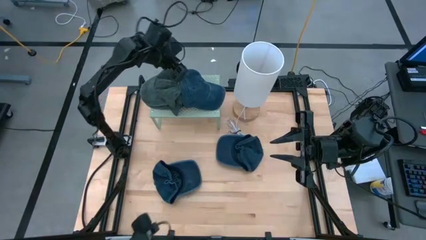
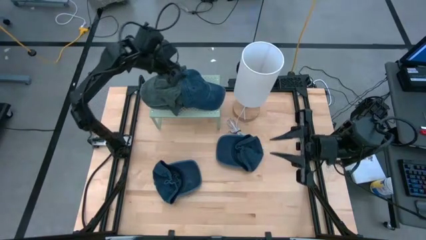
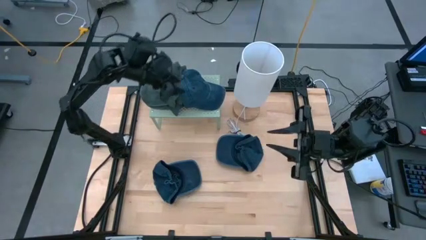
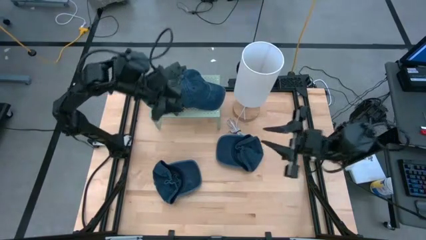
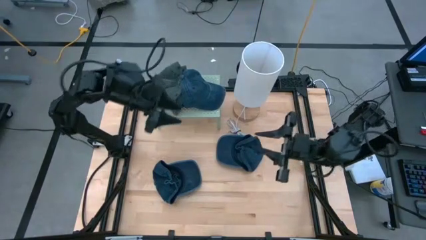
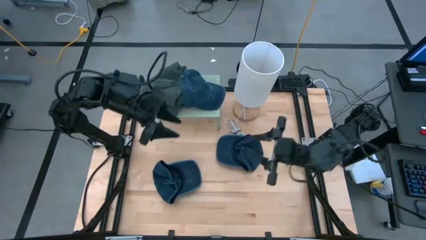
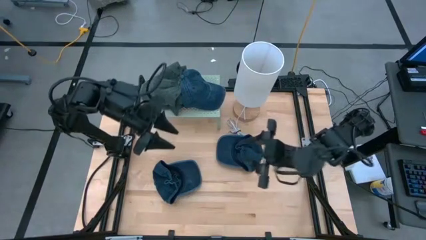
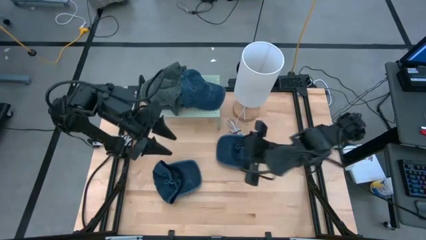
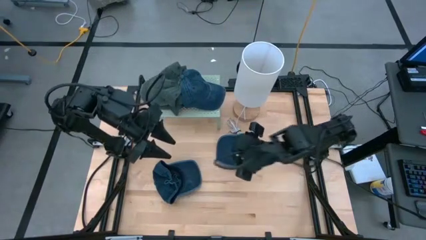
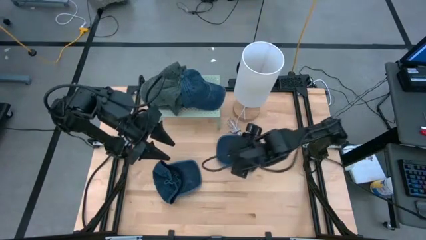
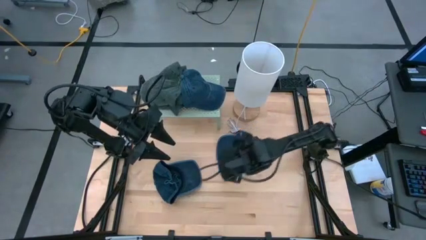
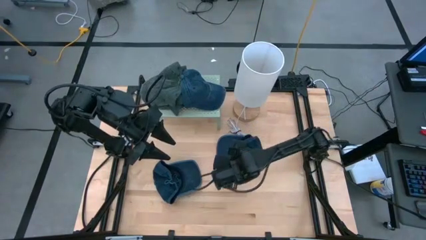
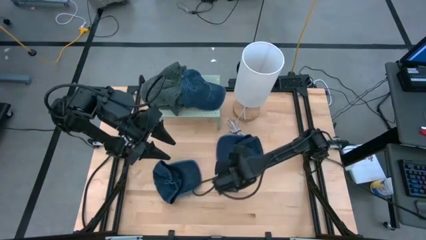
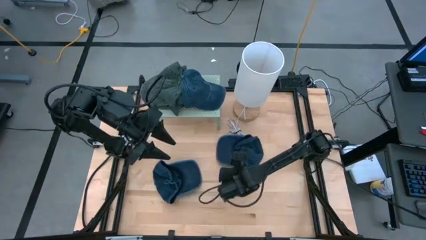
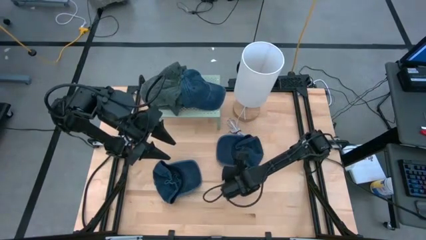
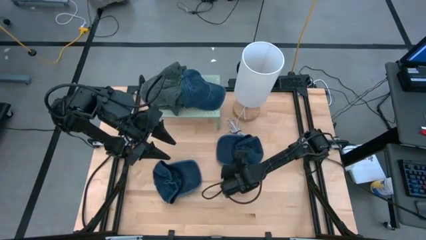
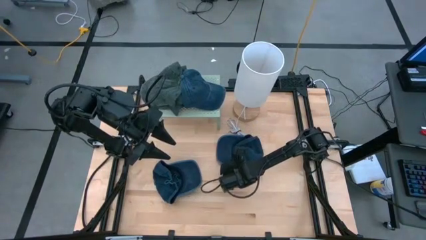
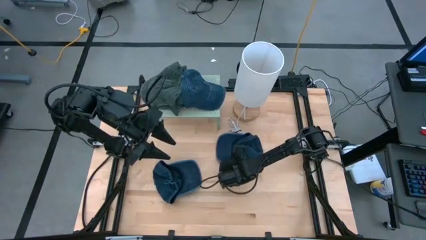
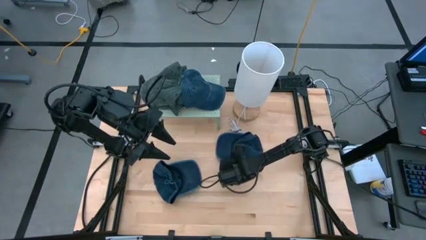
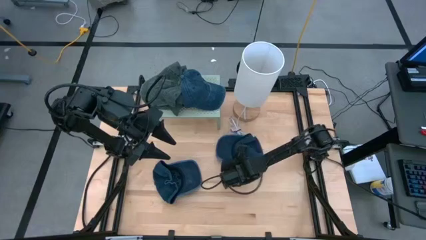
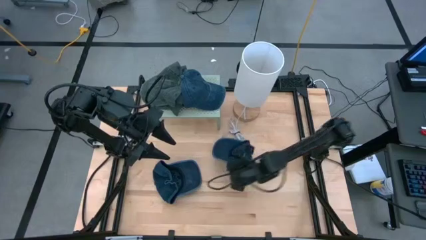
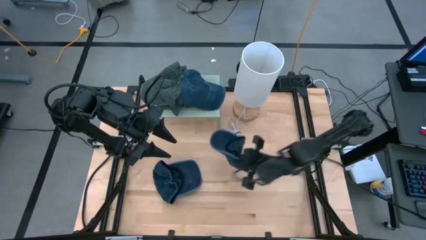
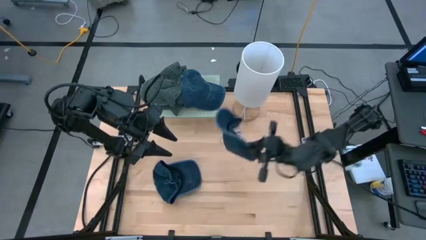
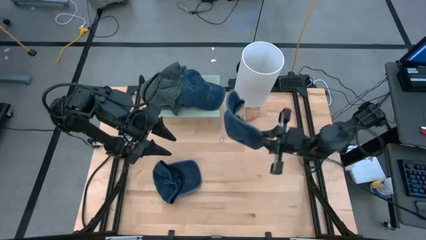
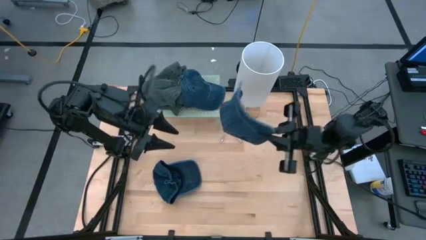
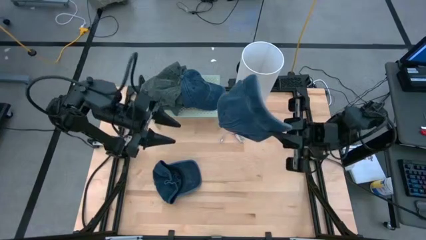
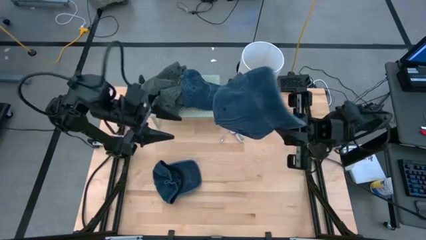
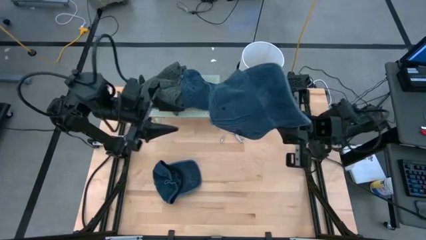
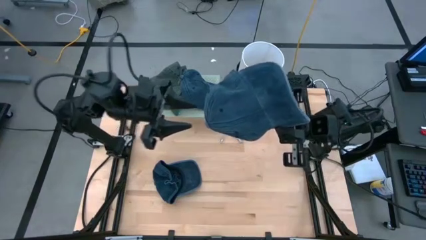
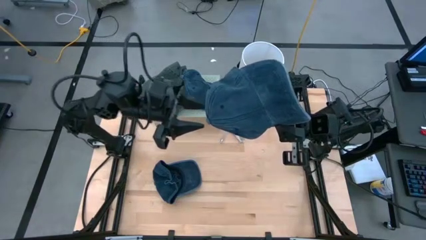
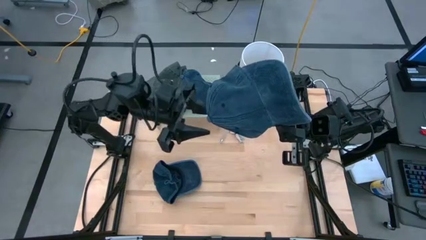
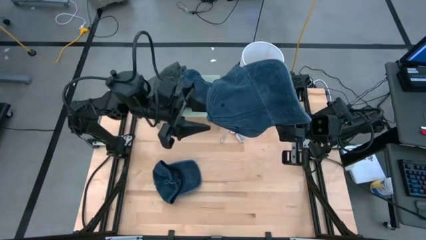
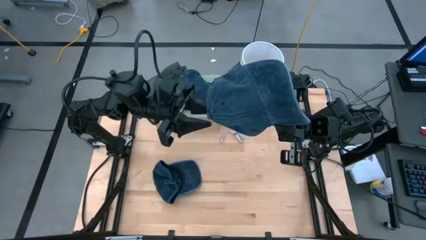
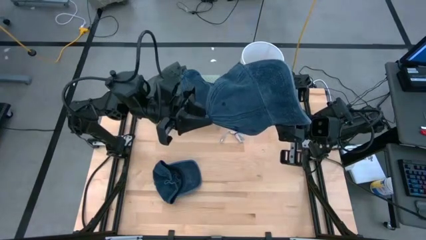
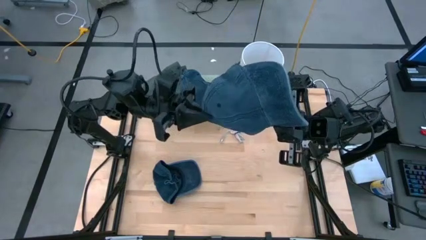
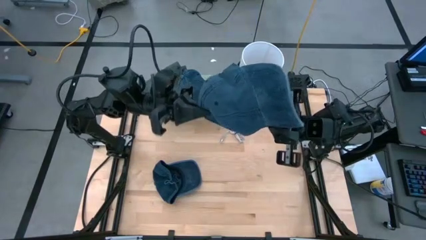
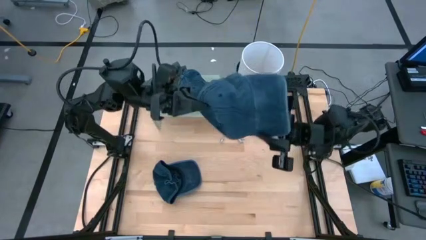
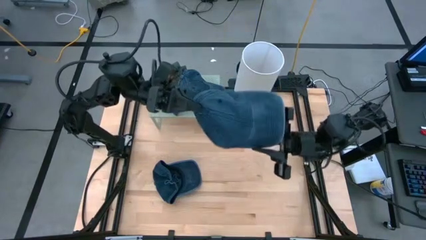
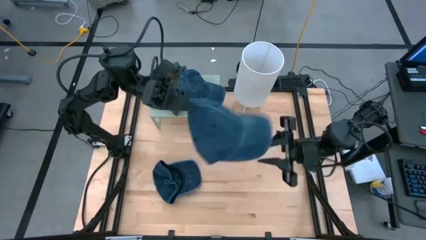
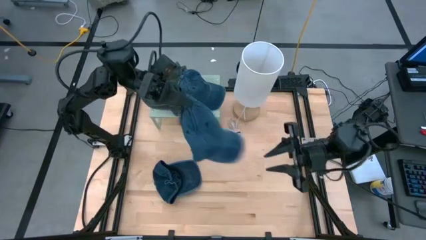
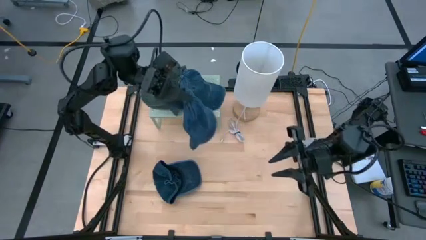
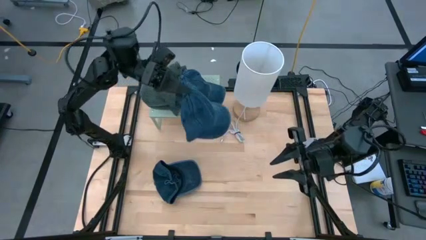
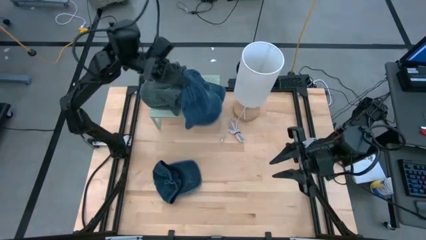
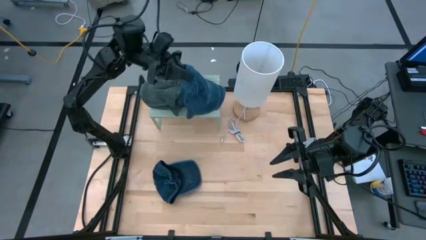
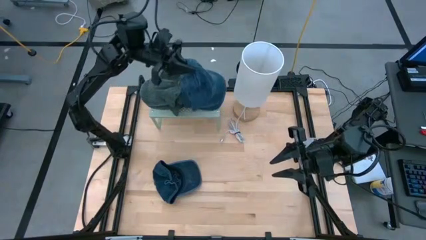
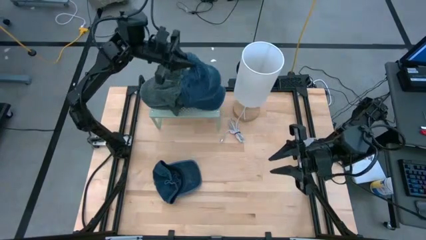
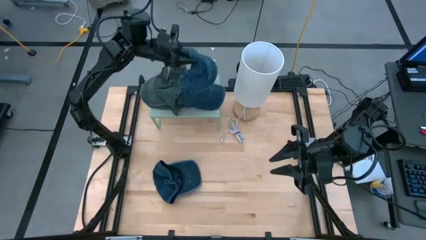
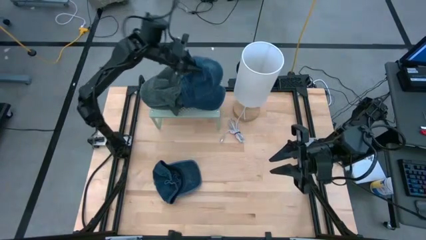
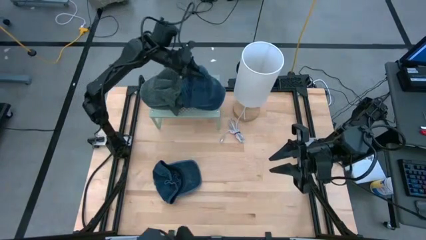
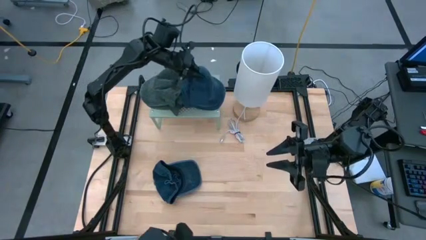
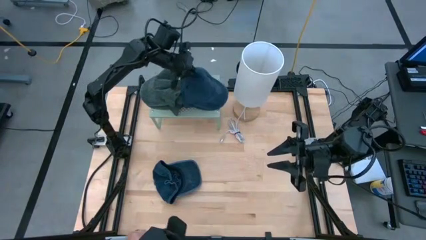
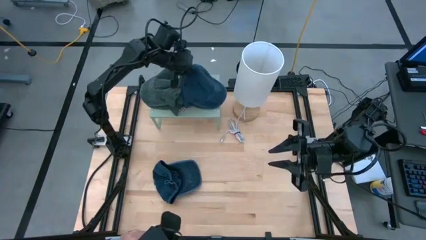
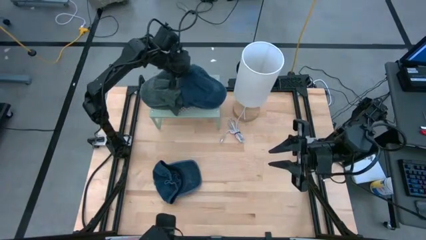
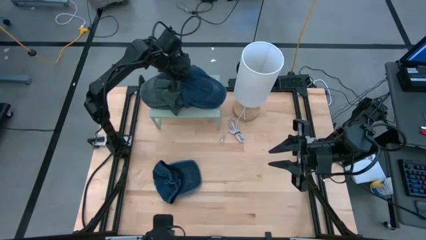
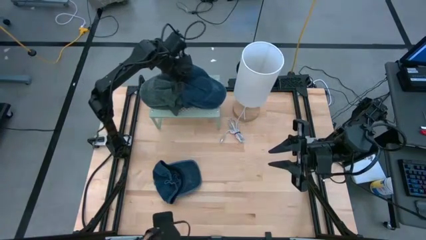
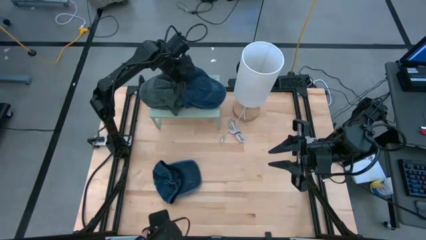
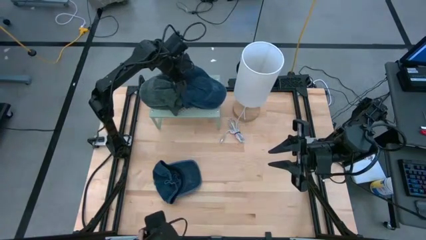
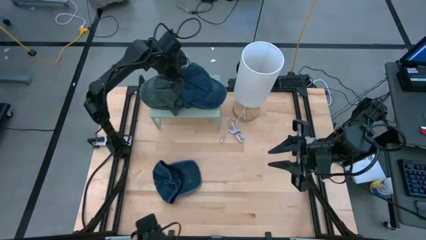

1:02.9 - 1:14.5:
Task: Pick & Place hat
Stack the right blue cap on top of the blue cap on the shelf
